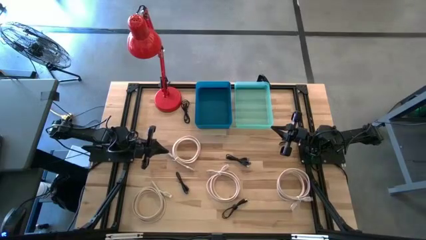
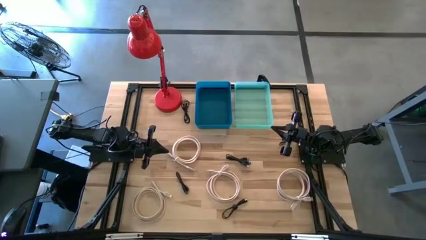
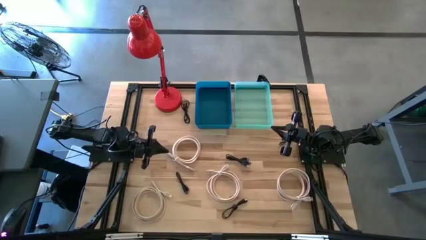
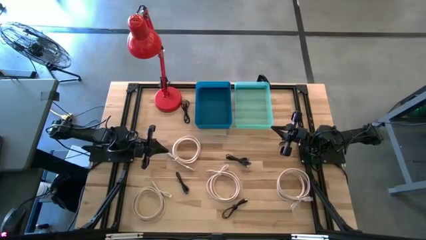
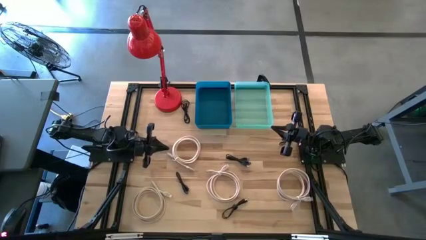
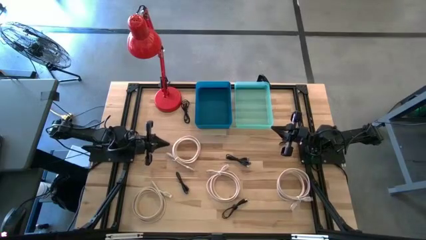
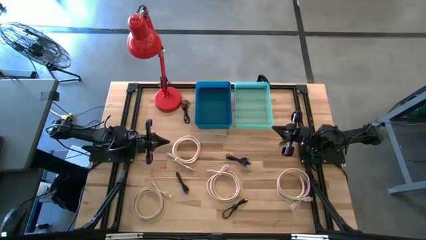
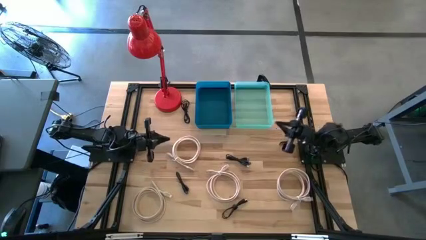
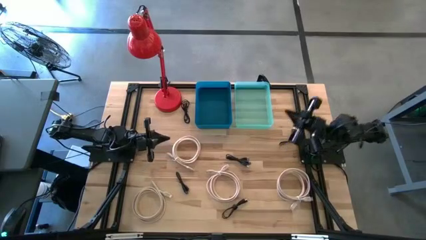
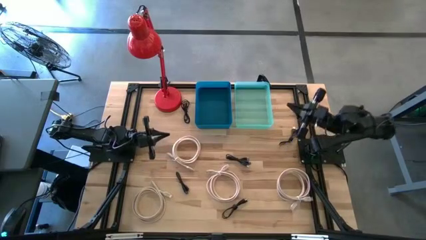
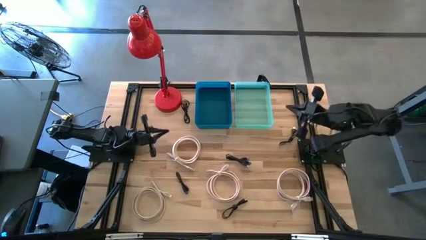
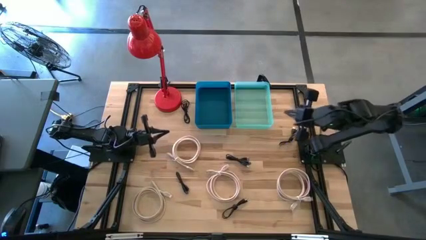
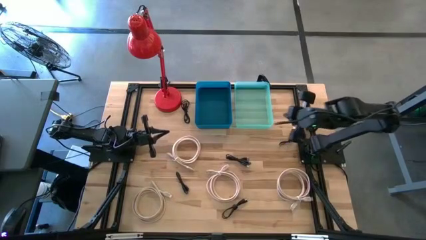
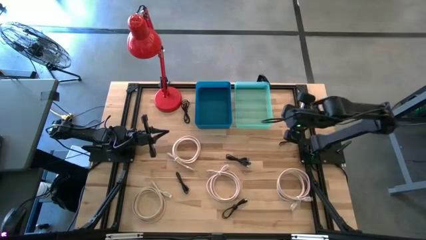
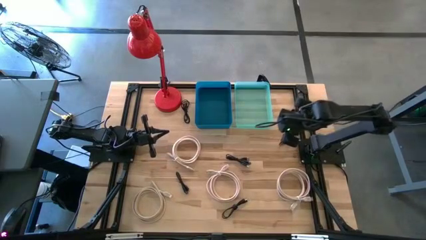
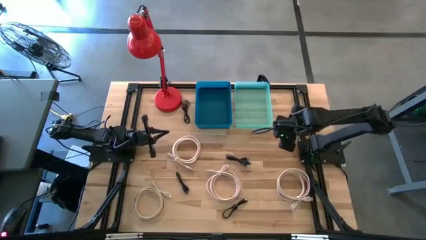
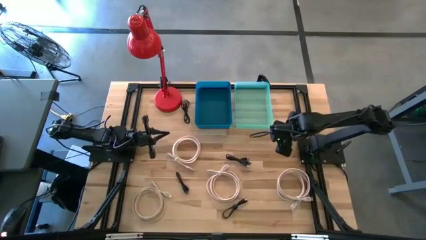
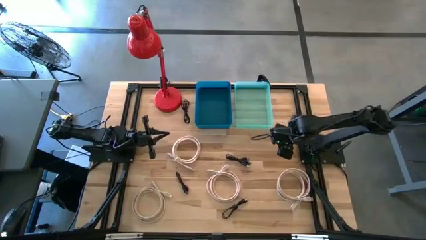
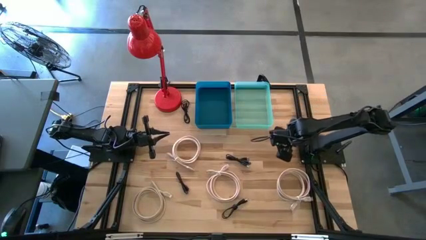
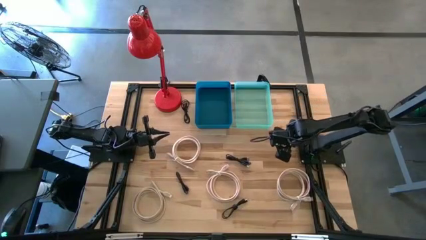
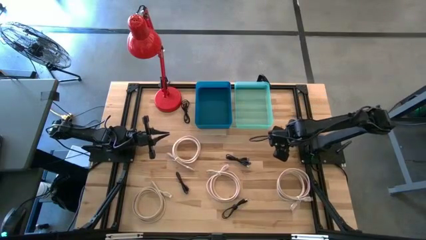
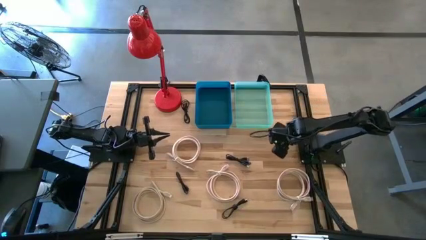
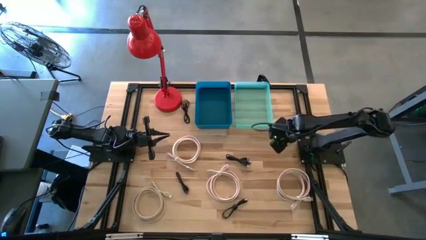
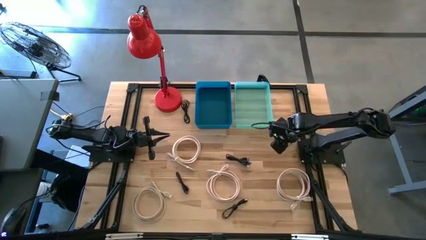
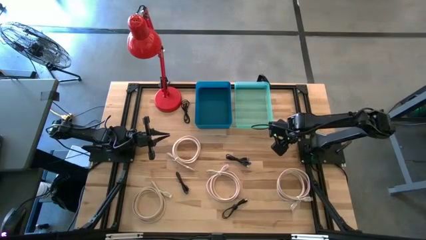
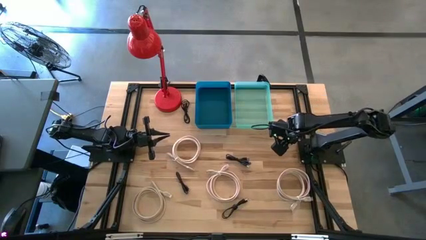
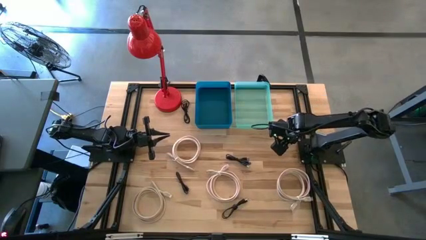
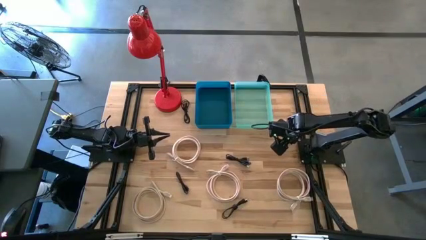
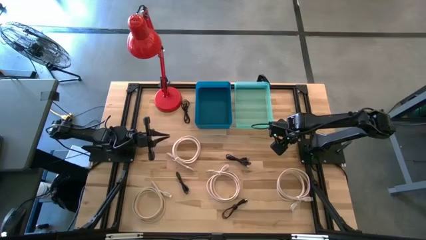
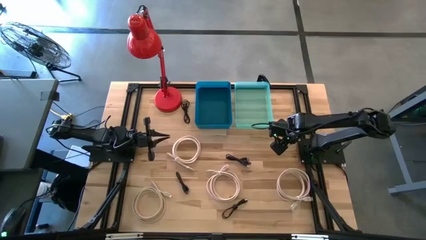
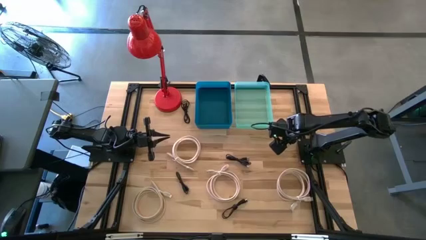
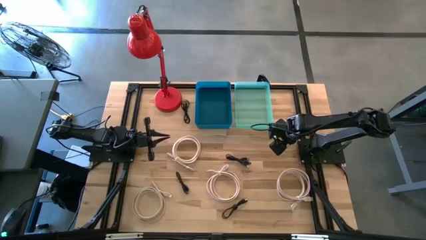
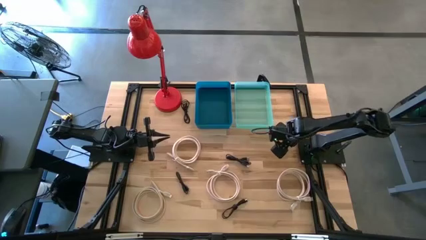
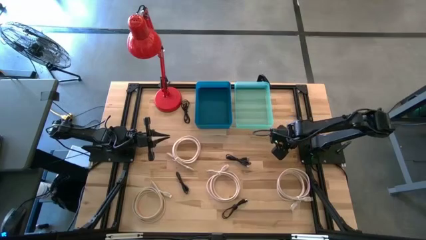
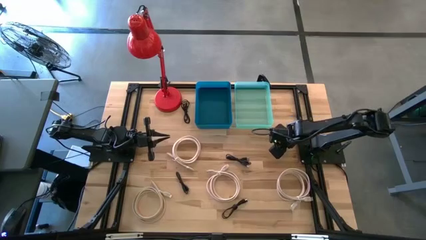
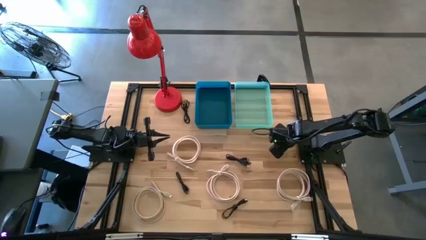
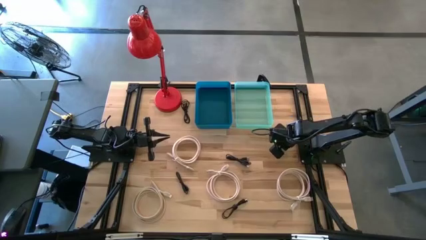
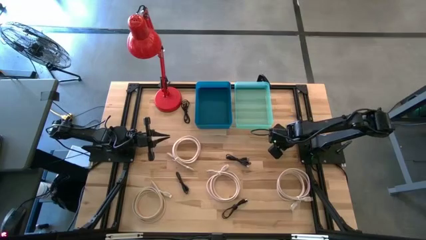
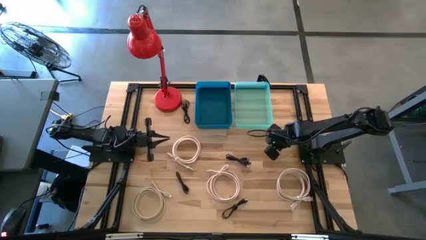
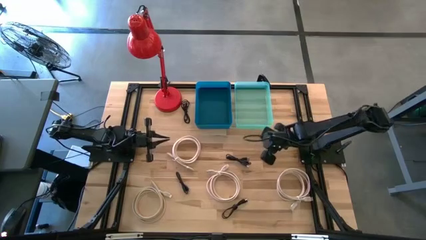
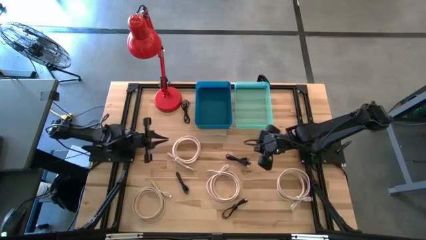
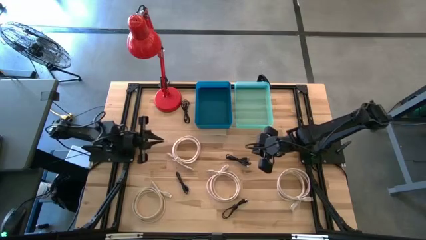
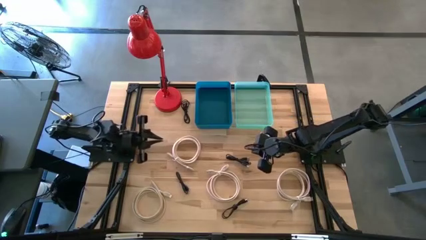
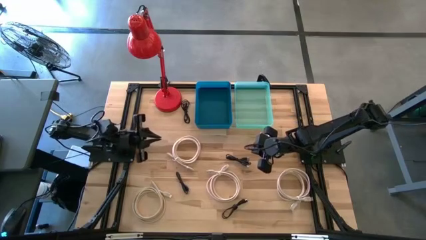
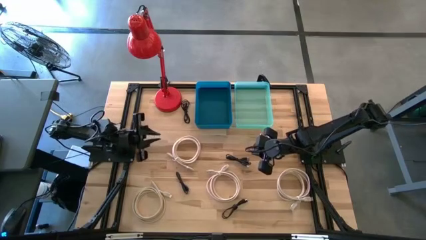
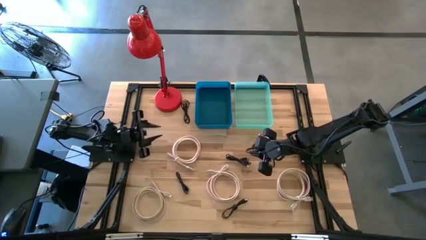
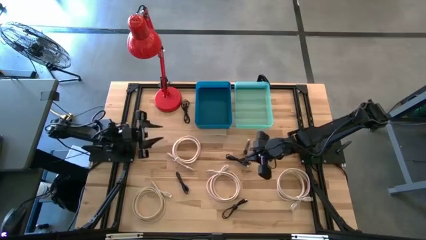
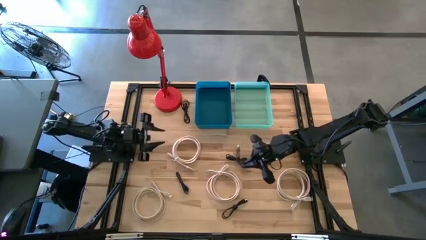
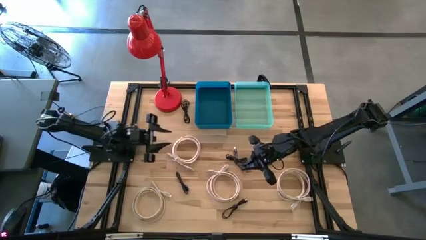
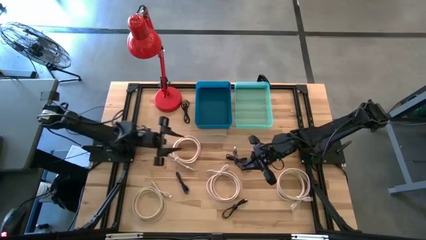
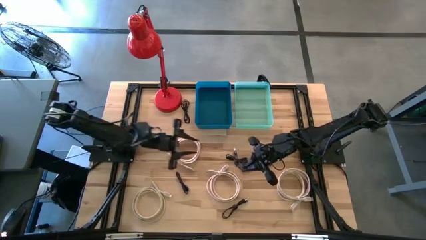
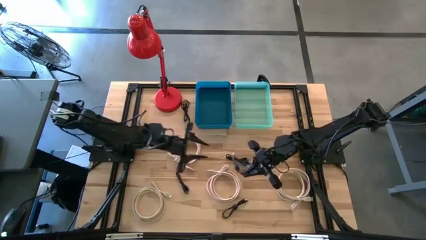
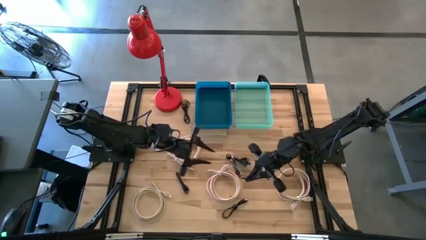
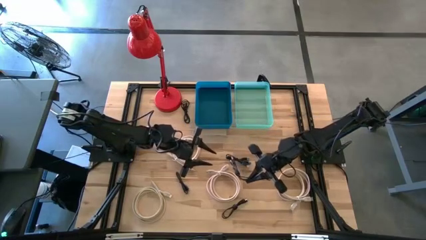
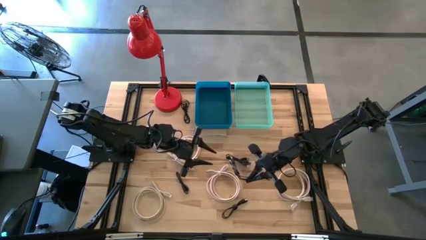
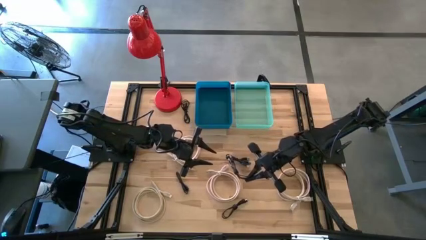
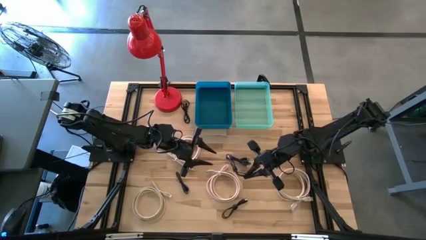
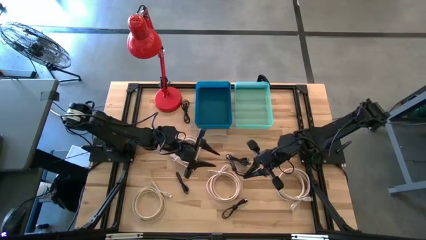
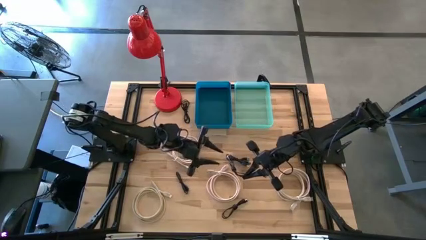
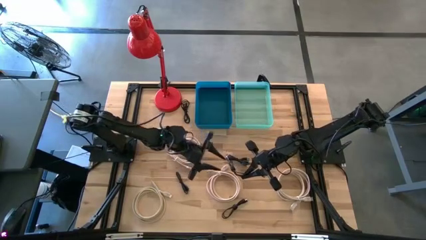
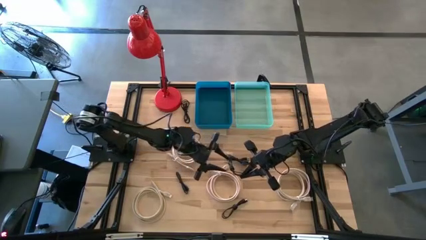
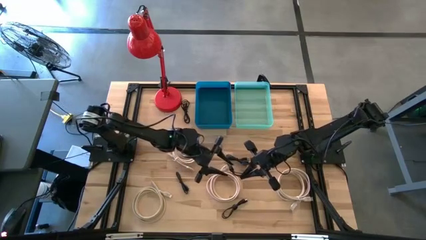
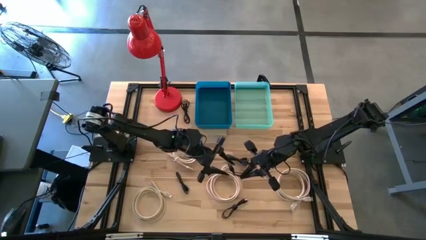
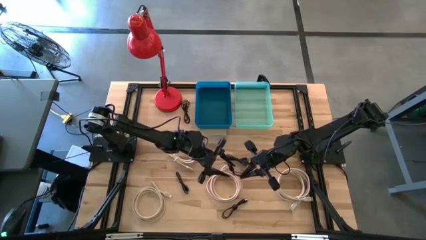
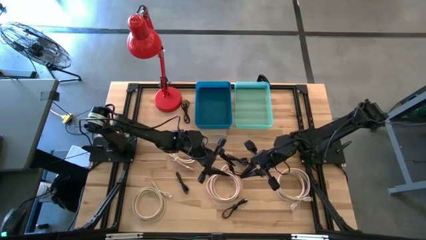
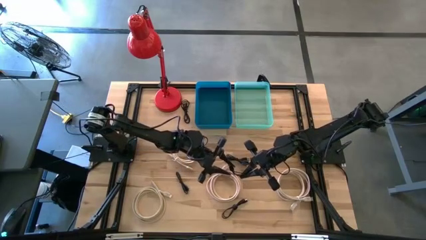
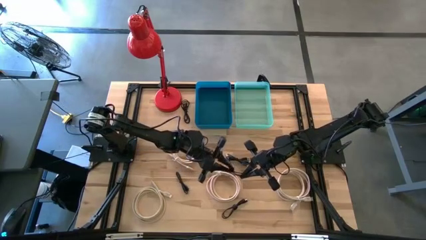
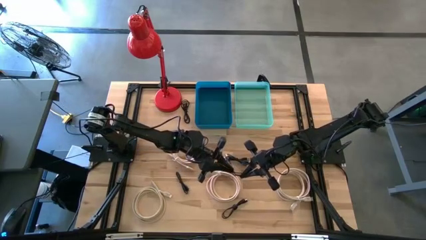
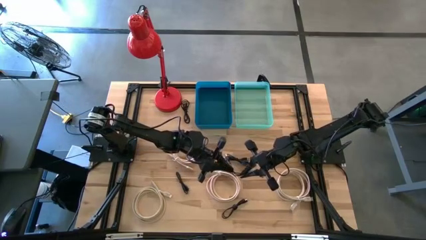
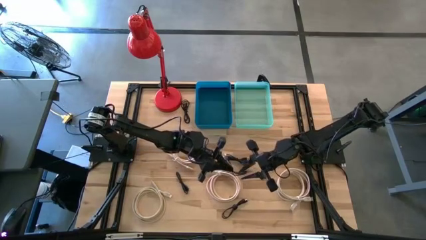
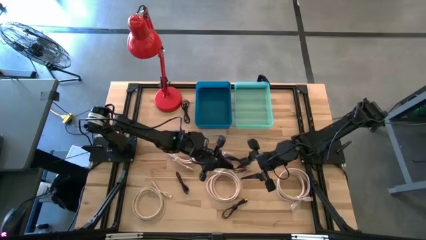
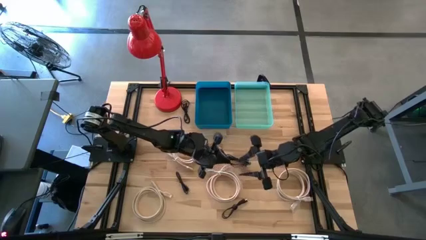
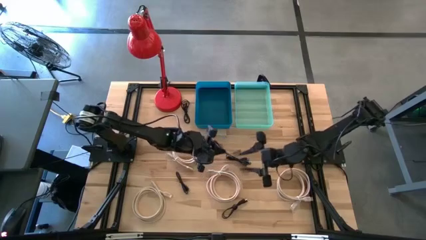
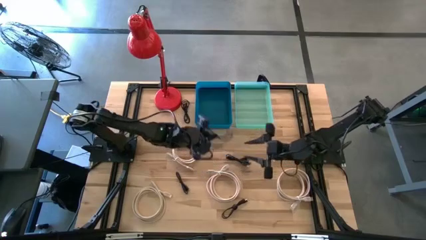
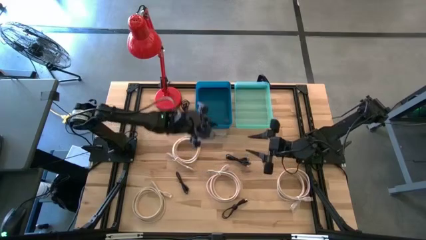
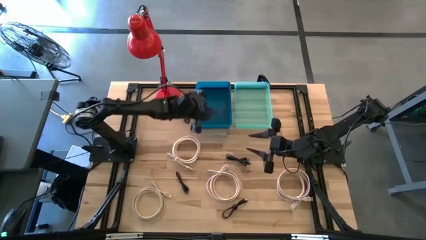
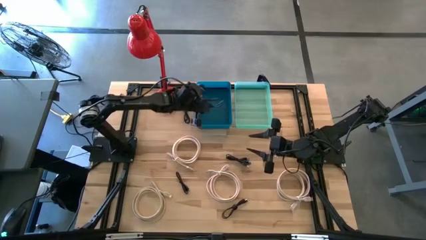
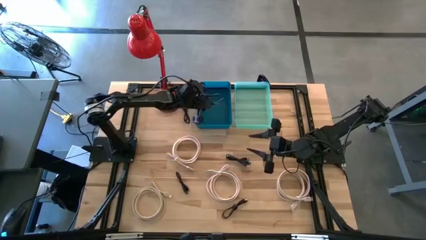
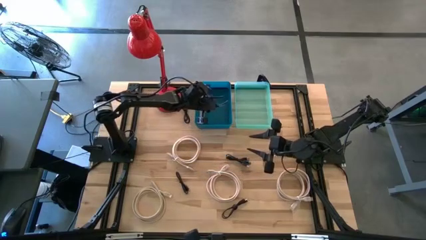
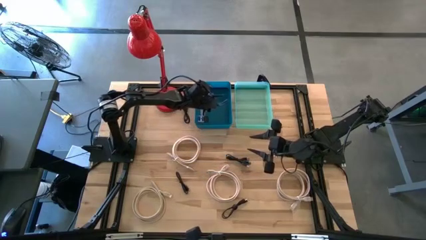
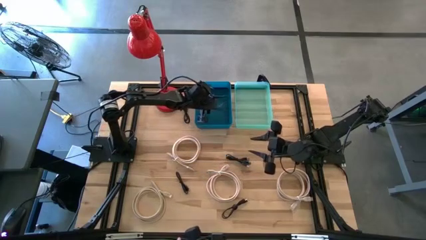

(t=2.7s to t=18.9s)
Task: Pick & Place USB Port
Put the black USB cable into the blue bin
